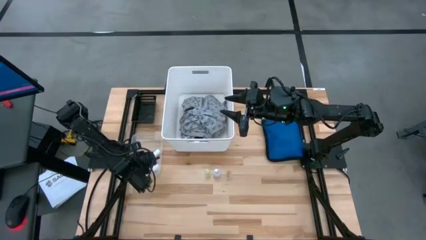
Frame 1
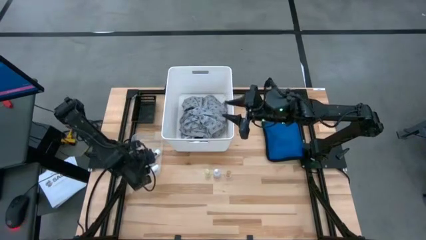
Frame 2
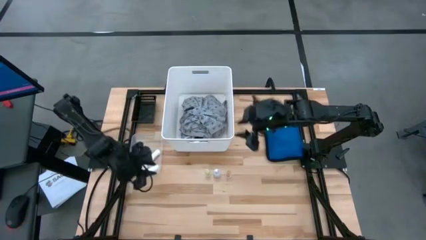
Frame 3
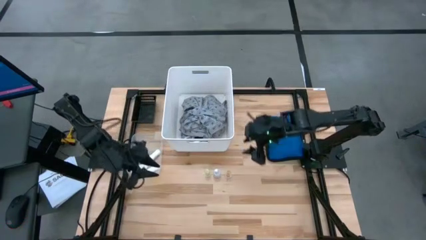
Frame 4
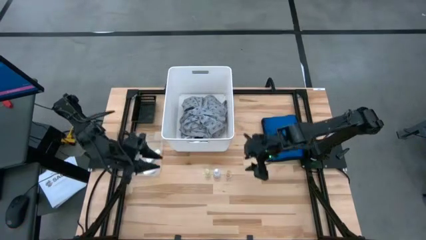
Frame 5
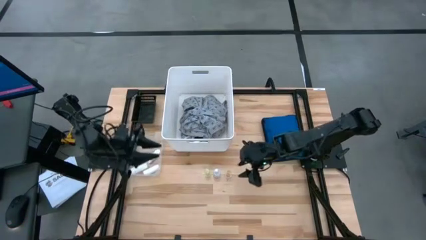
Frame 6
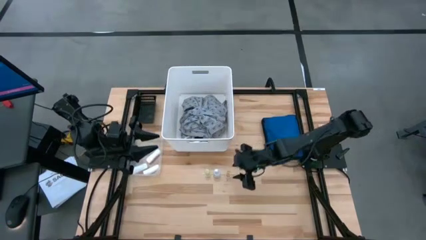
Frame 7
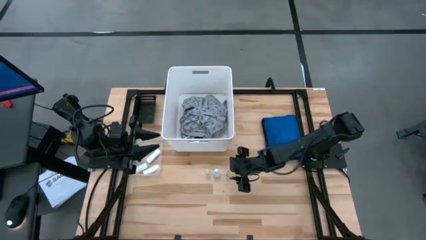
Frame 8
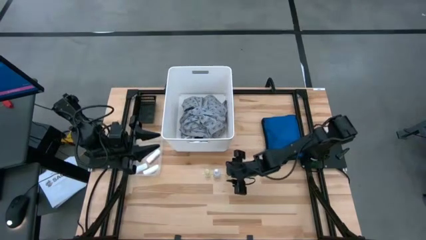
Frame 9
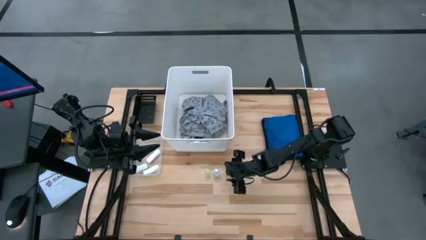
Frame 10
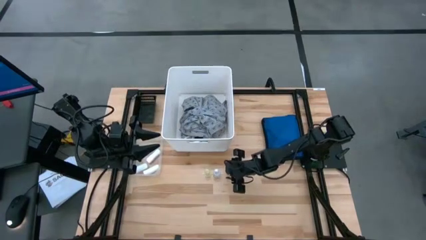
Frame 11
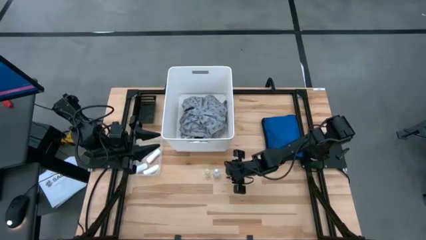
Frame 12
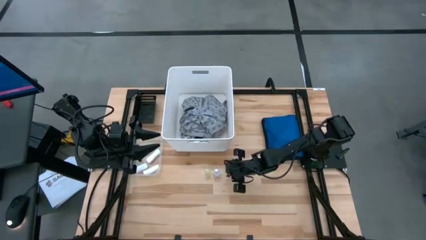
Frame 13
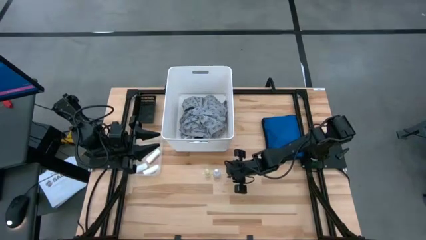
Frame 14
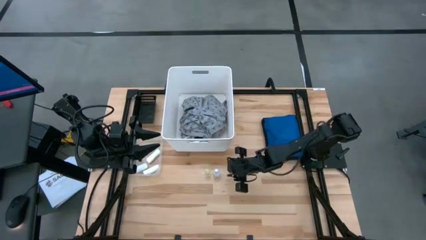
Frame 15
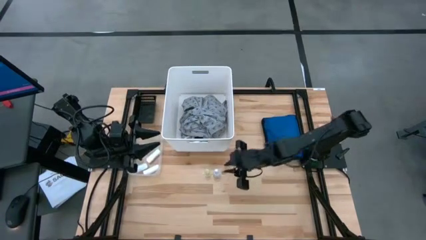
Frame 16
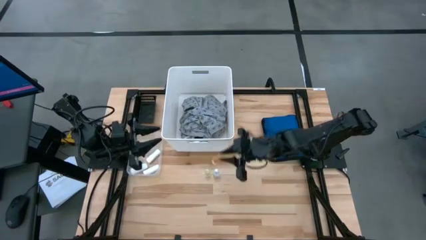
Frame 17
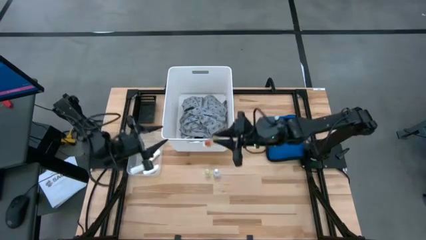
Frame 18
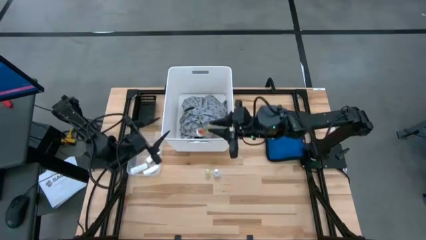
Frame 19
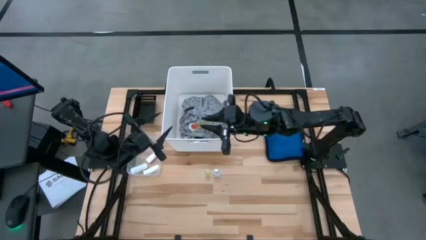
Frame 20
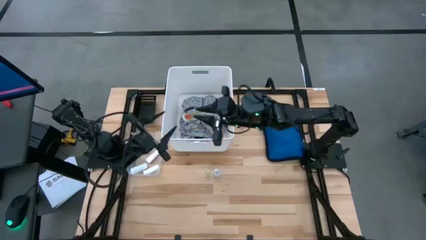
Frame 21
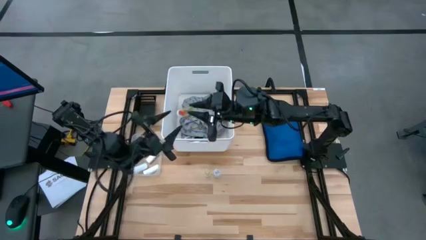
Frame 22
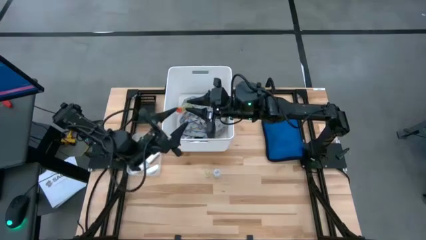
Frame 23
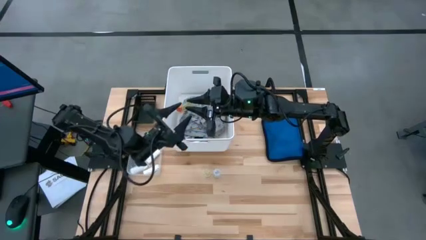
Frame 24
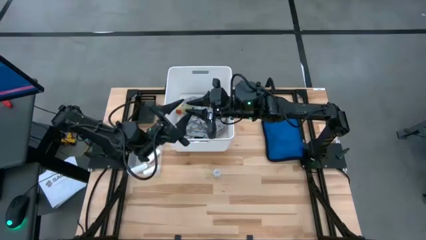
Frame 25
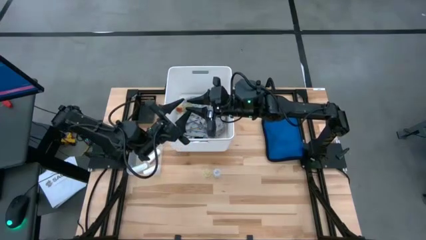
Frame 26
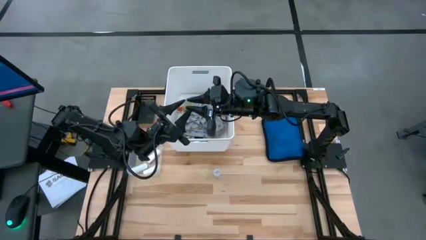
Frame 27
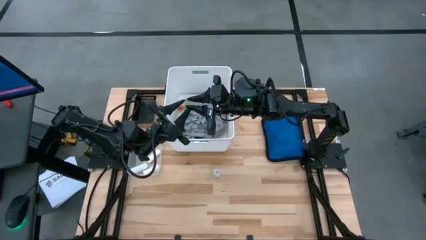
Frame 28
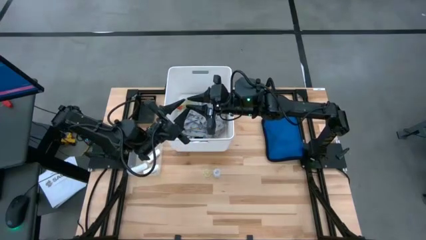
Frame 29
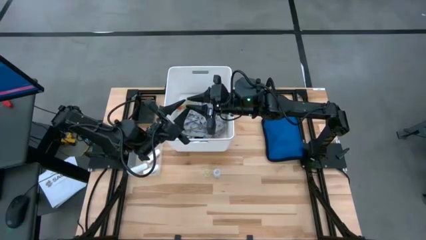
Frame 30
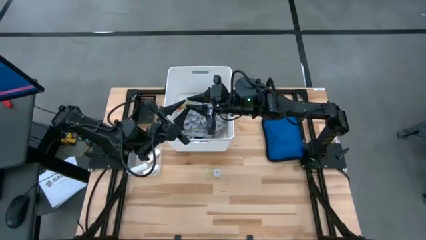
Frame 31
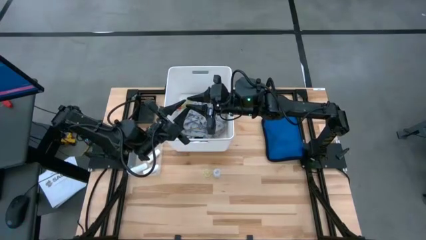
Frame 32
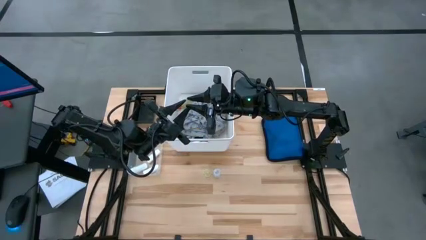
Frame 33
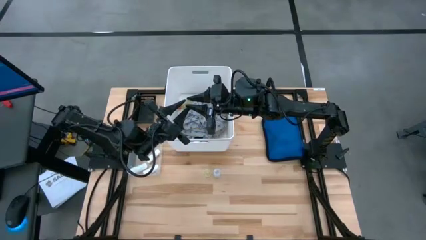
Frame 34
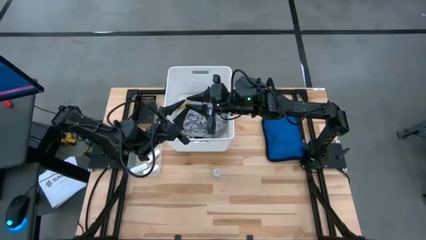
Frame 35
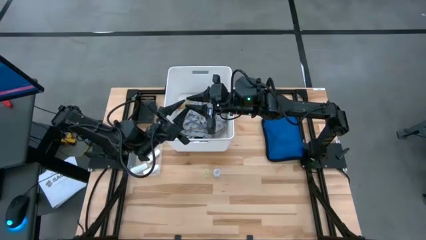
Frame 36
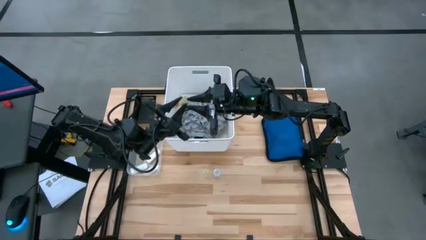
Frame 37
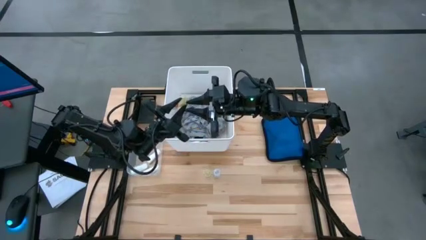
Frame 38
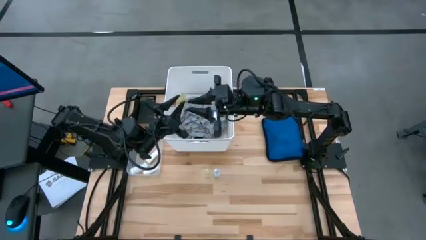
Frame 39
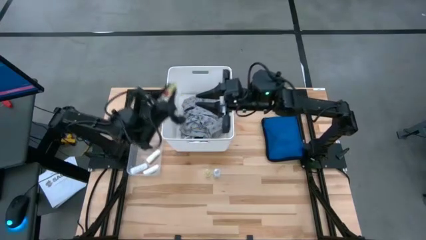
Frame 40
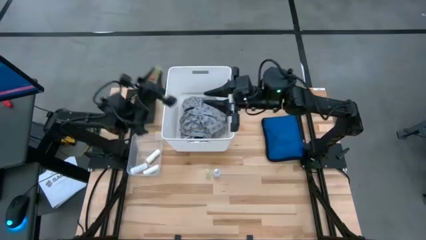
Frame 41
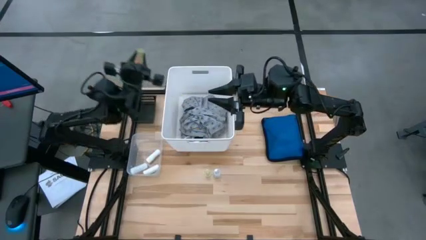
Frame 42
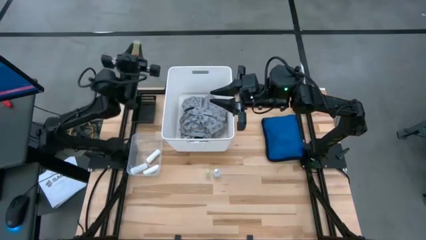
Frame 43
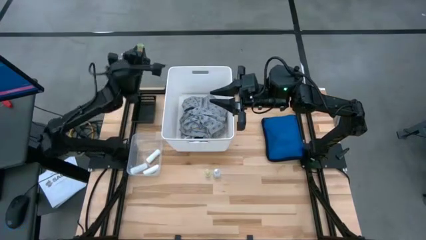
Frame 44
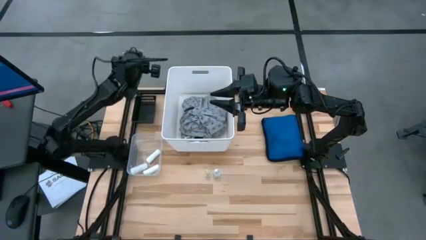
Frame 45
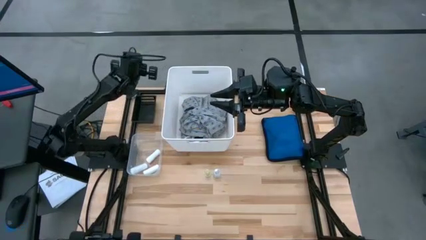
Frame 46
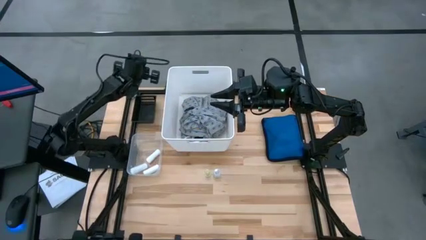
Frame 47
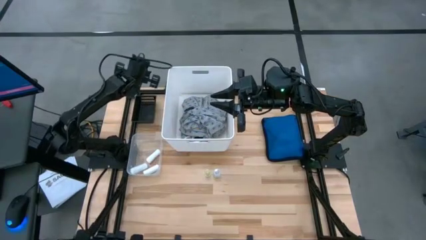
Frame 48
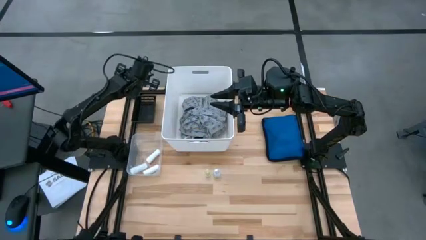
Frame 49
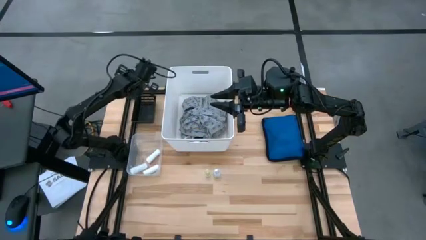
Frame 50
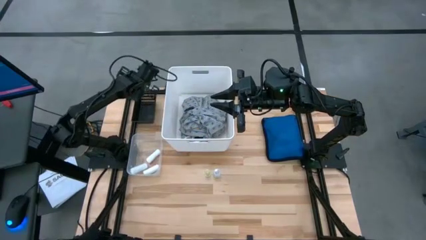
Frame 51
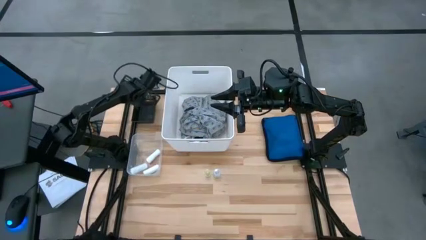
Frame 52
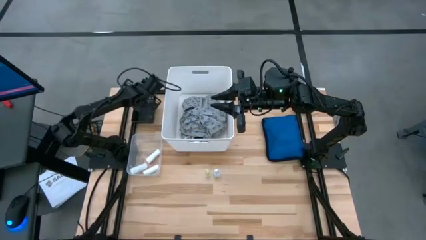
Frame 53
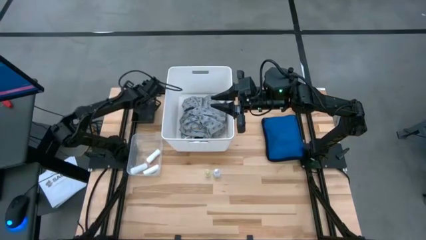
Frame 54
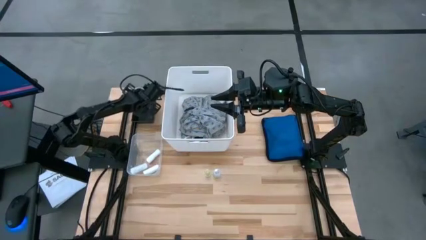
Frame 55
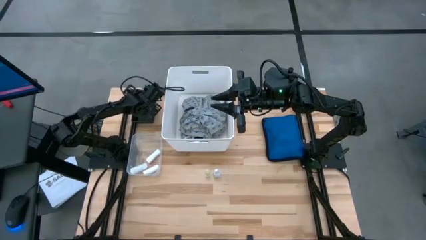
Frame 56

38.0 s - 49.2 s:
Task: Pick & Place Medicine items
Put the right yellow pill bottle into the black bin
